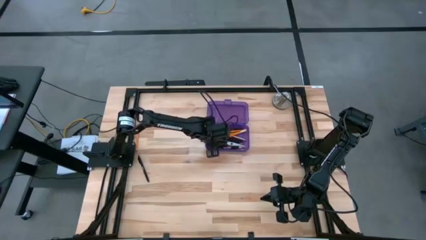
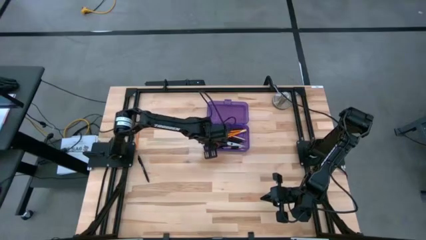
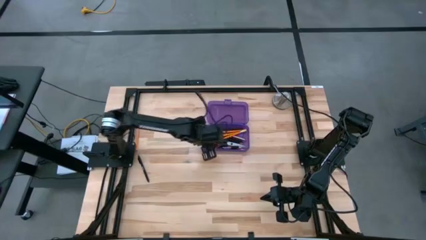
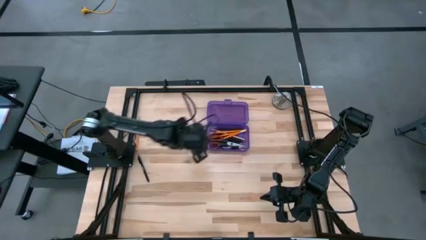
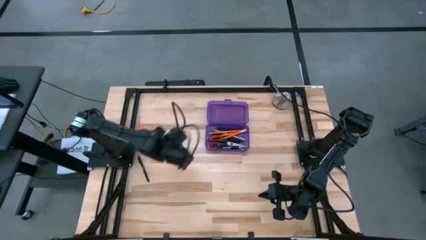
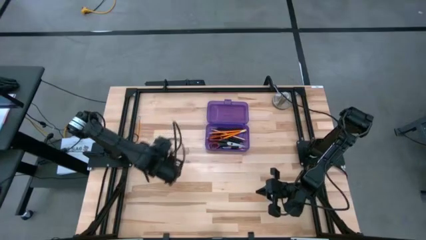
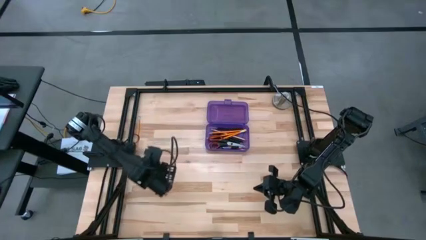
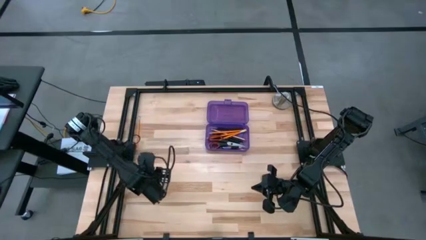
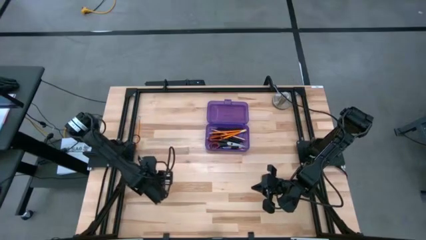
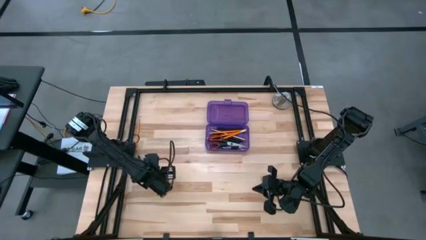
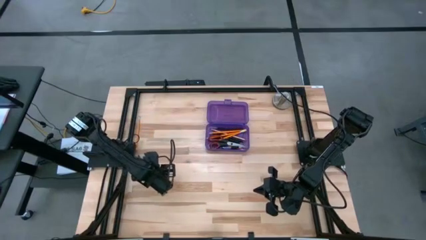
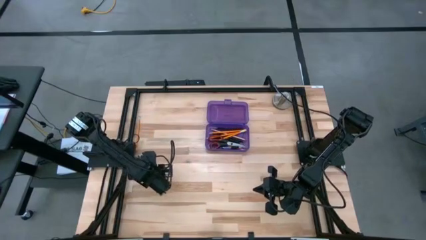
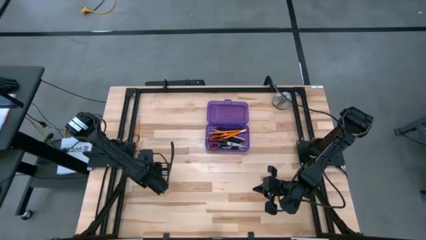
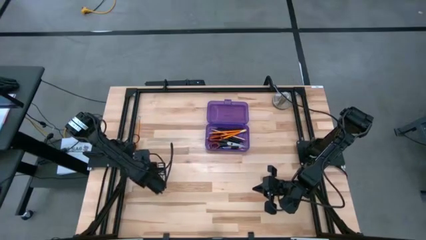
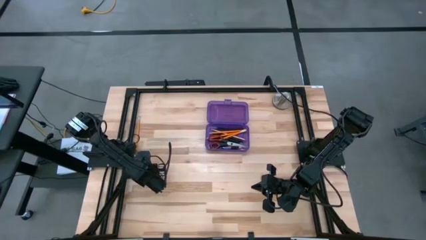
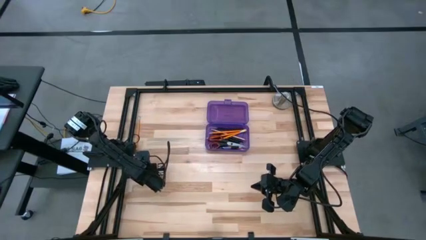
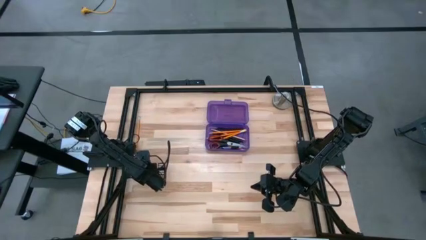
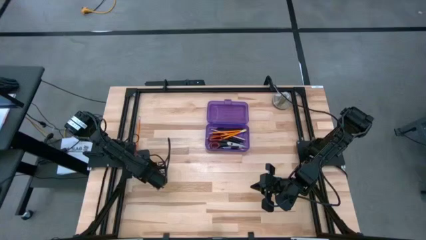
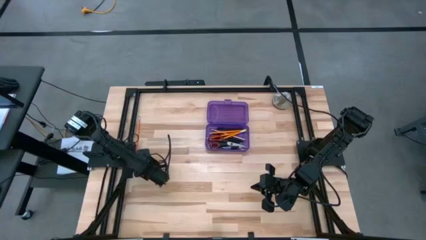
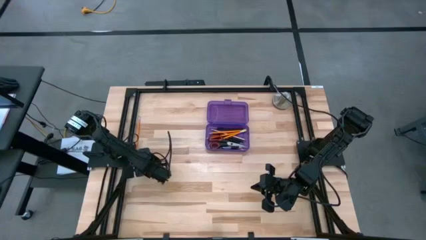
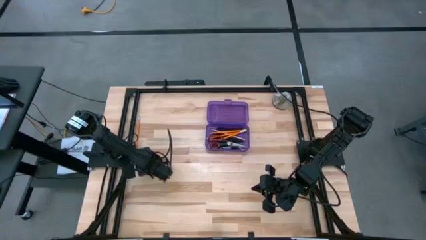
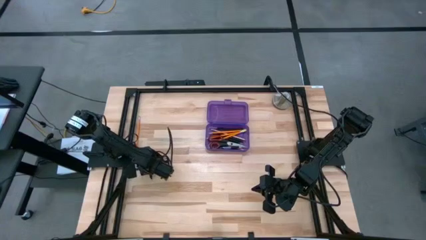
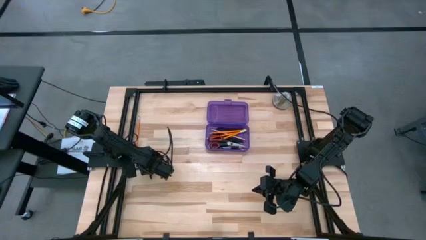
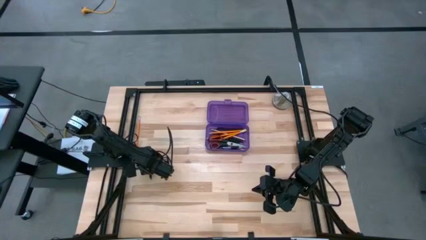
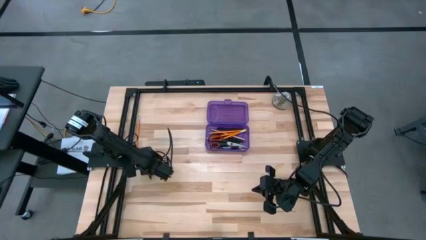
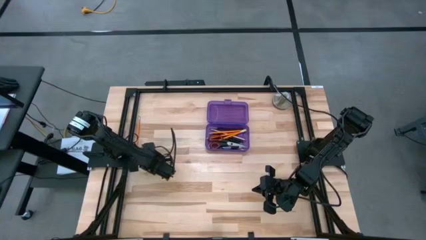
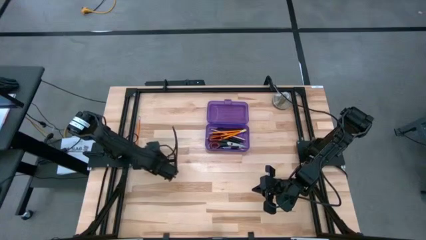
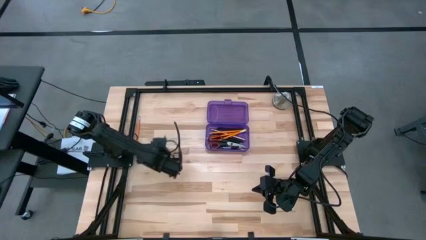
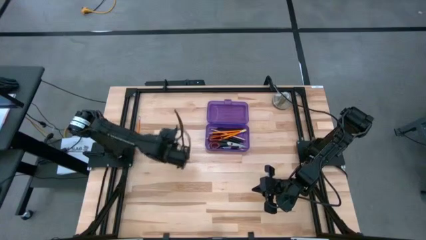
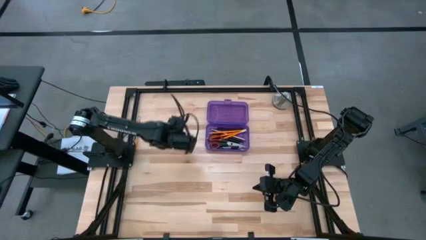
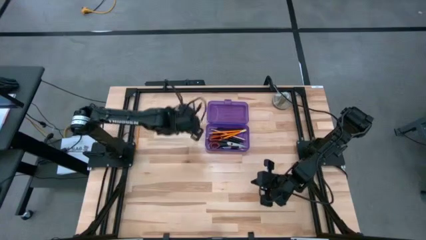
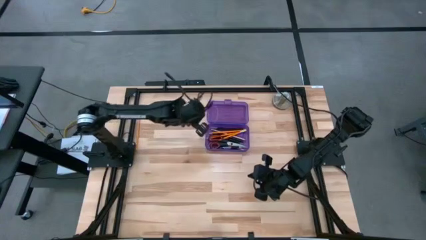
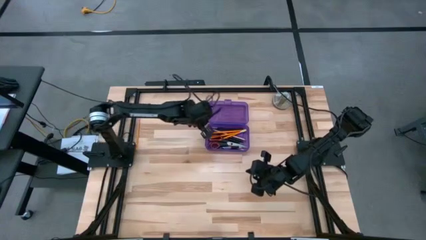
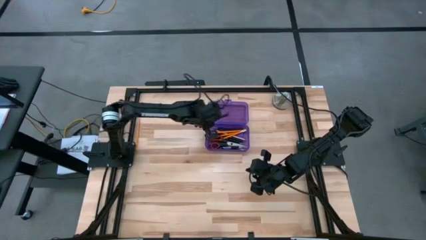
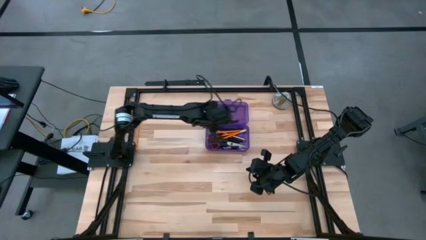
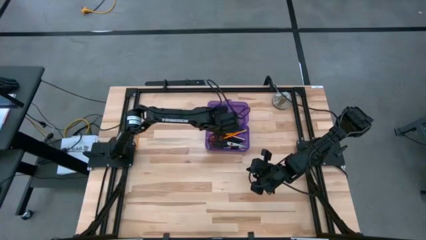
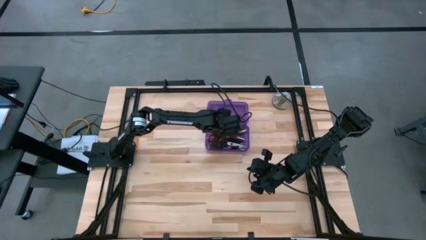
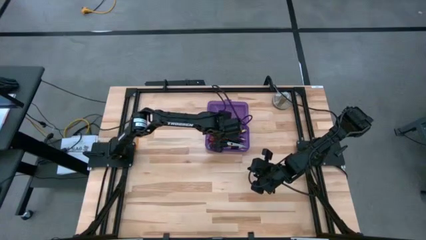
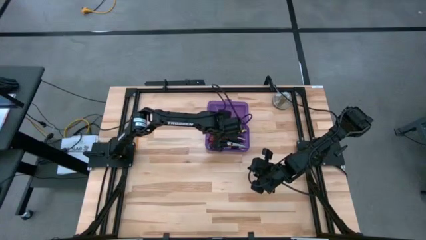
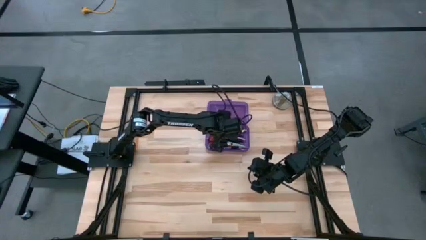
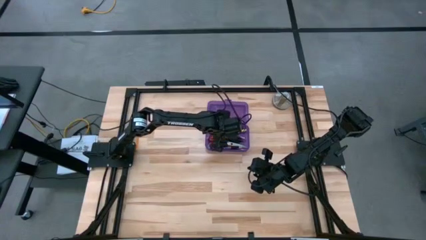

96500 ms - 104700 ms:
Task: Pick & place school supplies into a supply box
Put the black pen into the pencil box

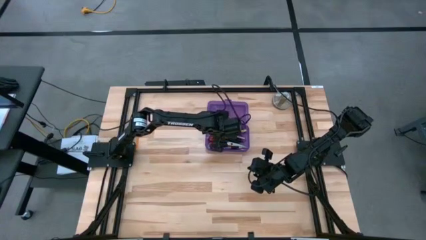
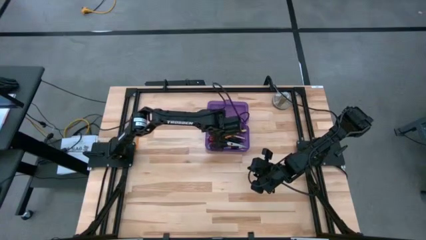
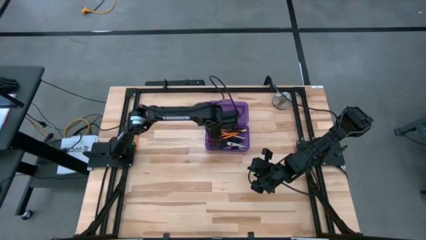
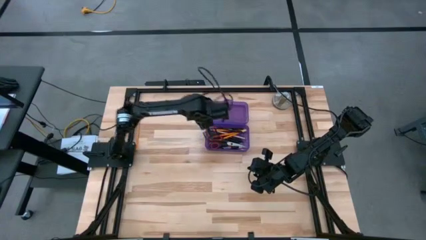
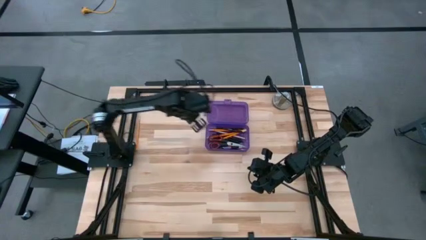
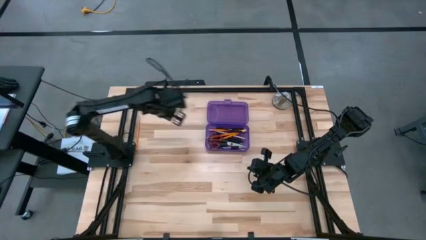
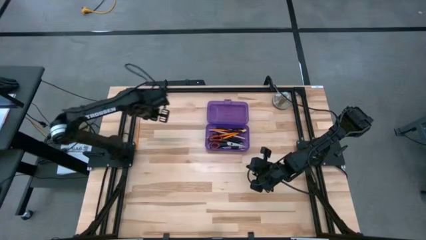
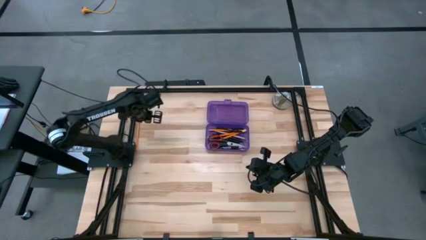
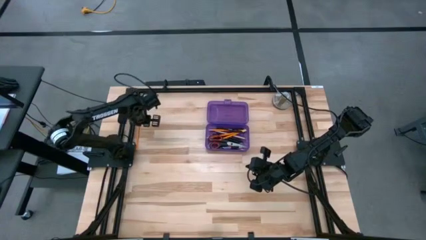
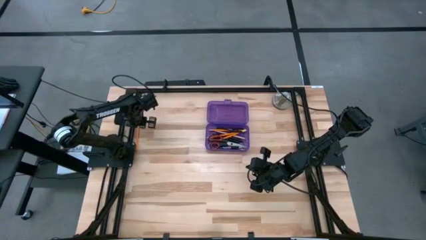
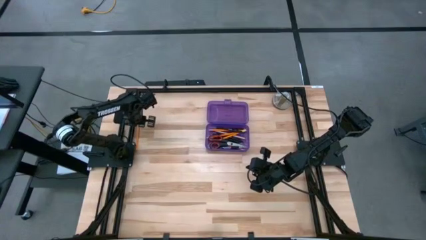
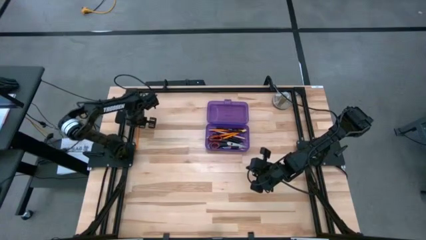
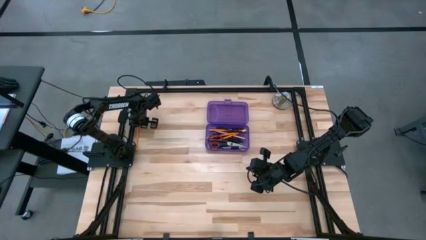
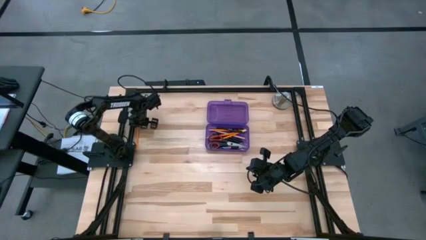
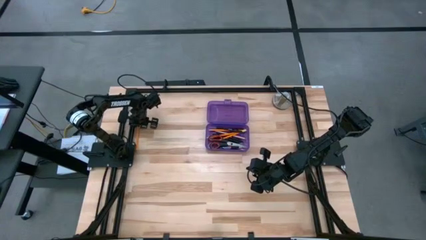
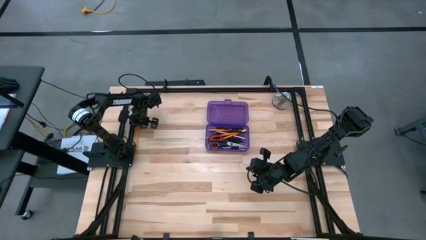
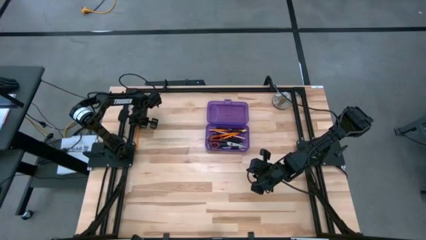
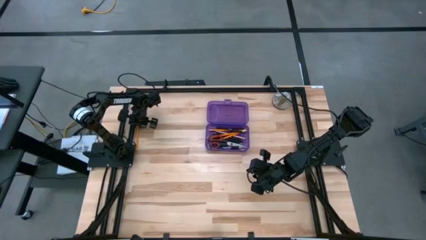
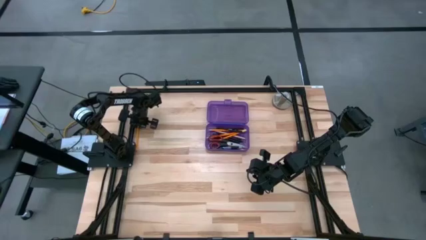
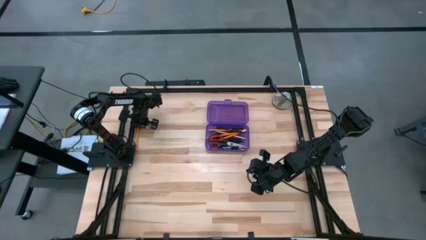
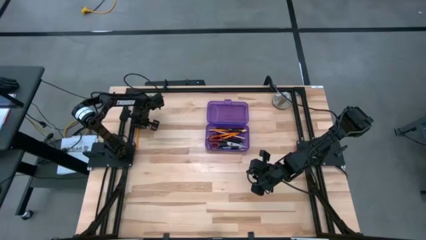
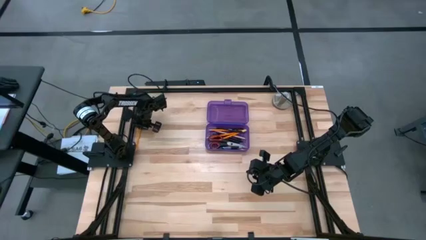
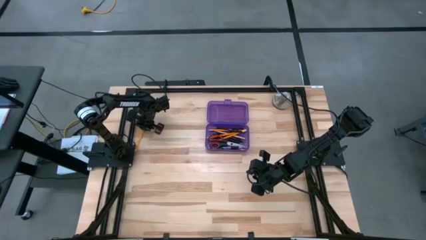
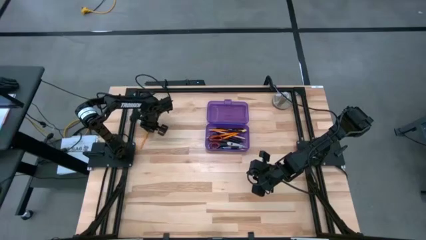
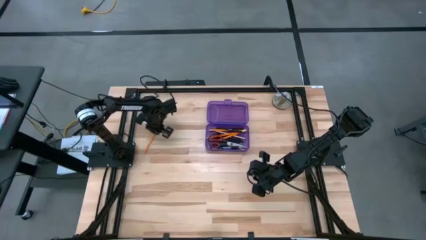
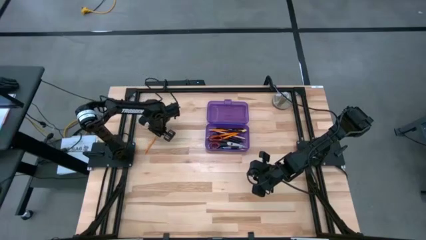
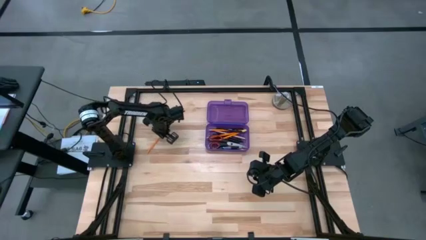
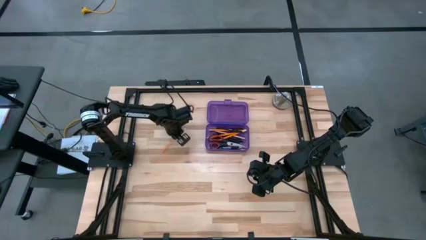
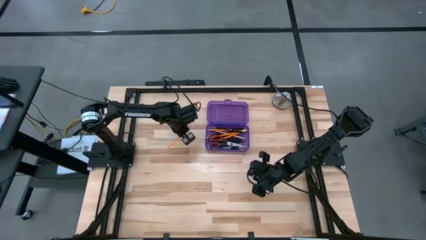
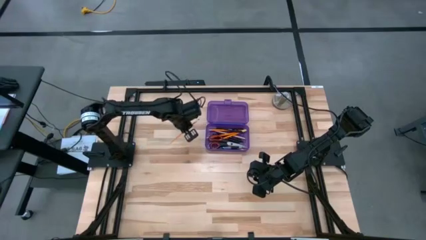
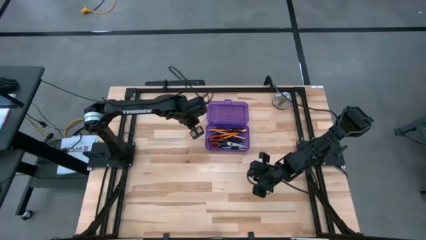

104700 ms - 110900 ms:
Put the orange pencil into the pencil box
